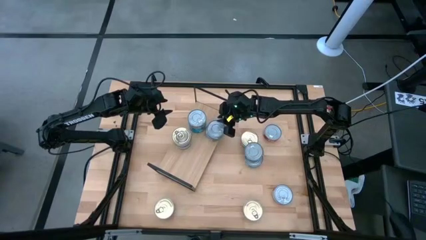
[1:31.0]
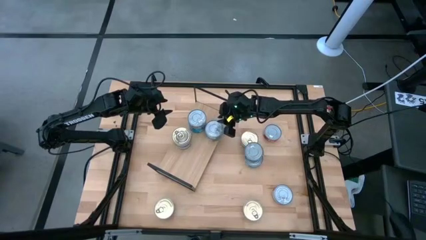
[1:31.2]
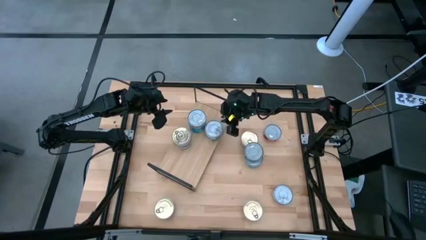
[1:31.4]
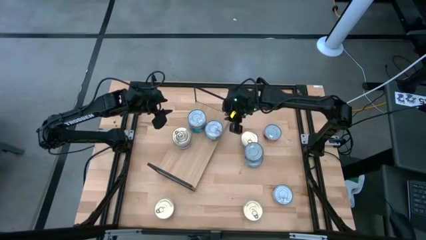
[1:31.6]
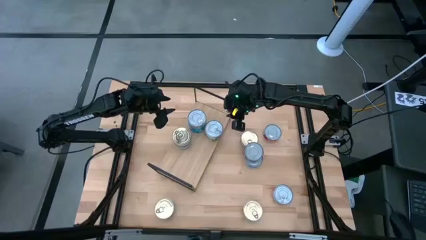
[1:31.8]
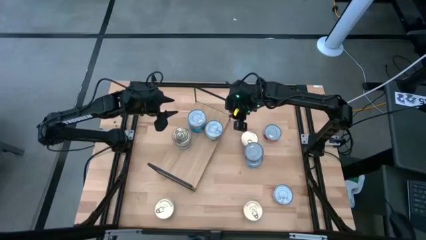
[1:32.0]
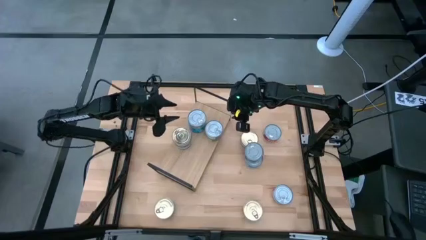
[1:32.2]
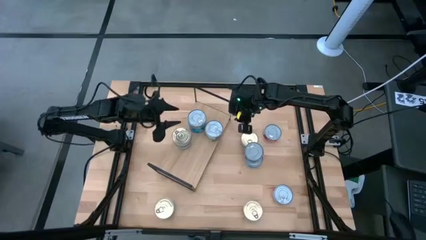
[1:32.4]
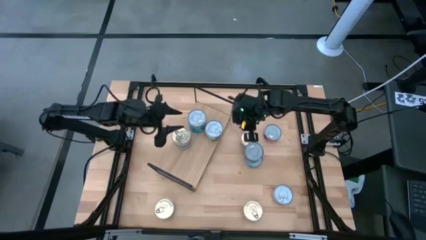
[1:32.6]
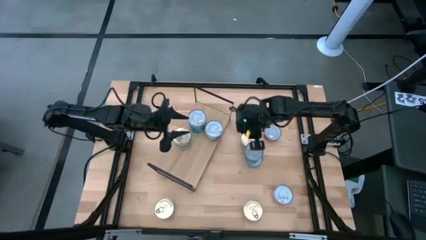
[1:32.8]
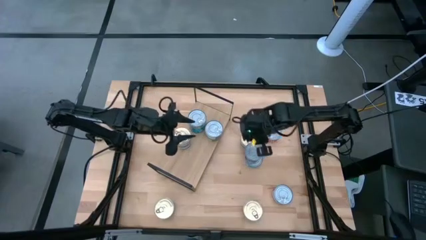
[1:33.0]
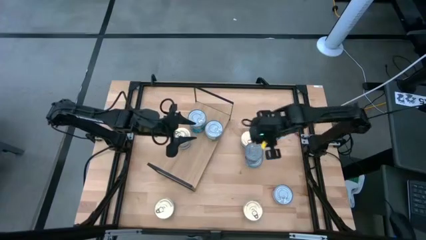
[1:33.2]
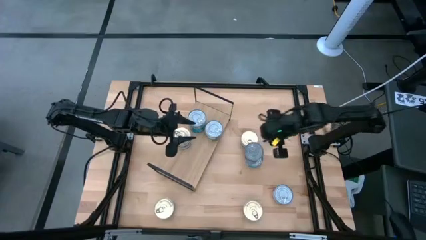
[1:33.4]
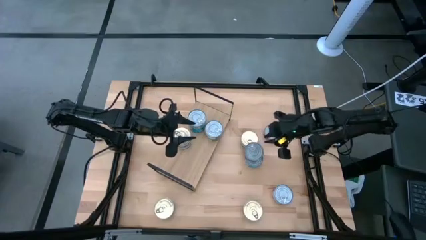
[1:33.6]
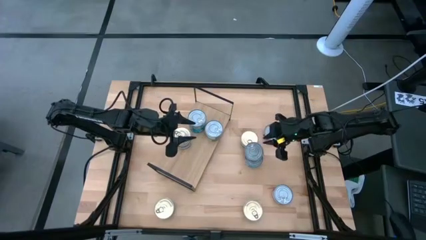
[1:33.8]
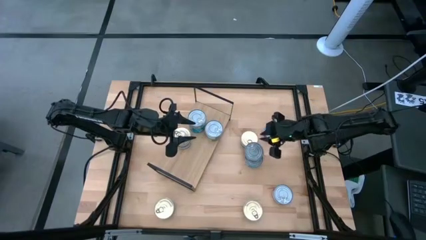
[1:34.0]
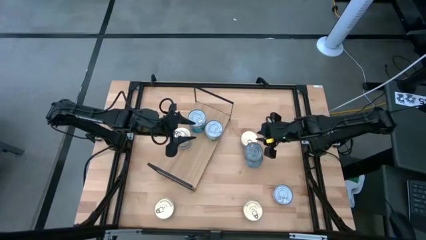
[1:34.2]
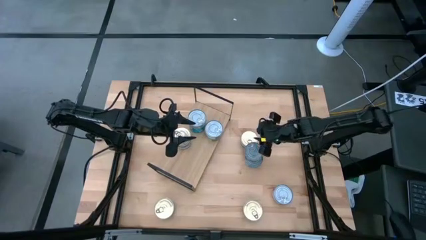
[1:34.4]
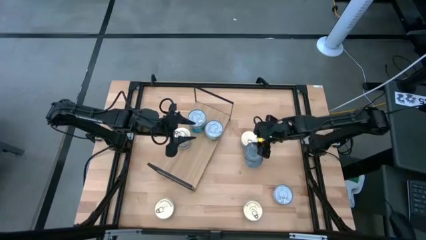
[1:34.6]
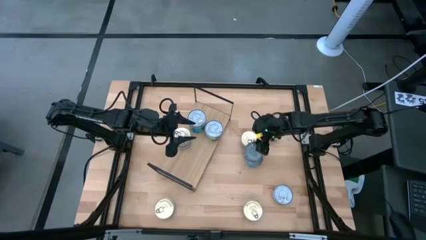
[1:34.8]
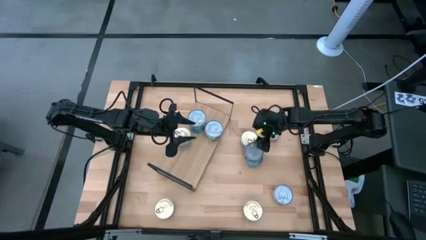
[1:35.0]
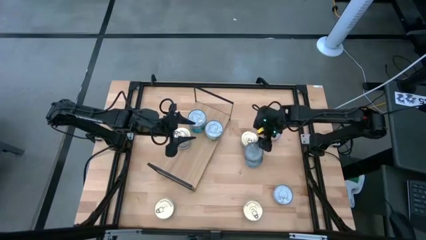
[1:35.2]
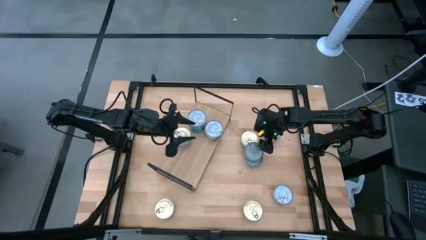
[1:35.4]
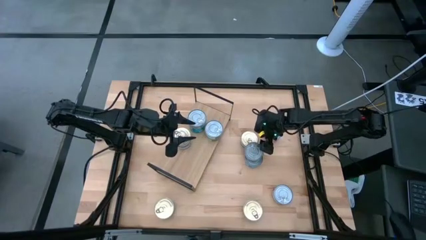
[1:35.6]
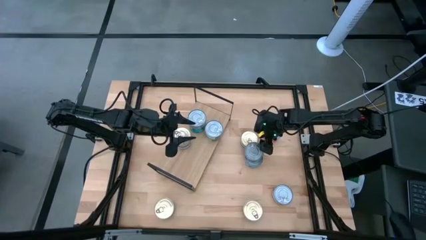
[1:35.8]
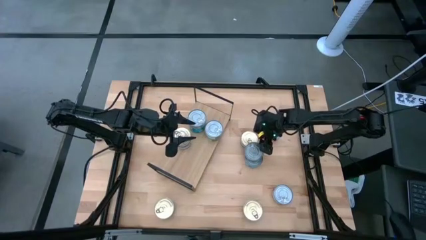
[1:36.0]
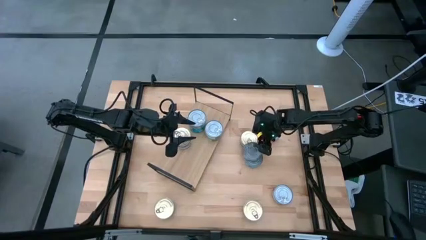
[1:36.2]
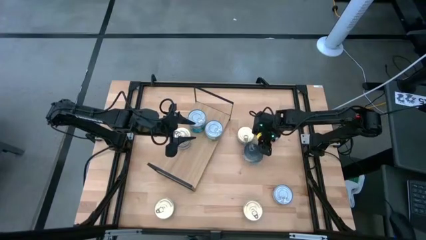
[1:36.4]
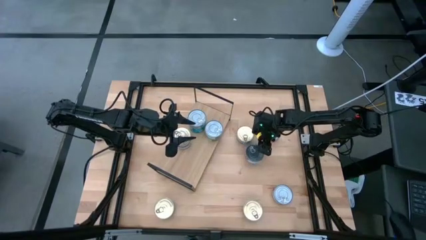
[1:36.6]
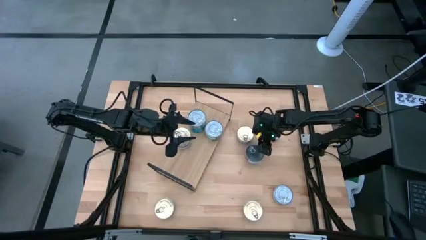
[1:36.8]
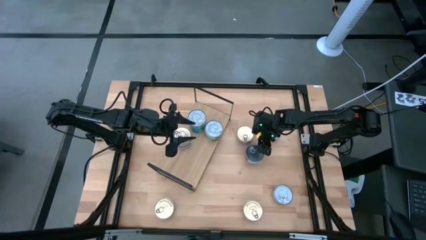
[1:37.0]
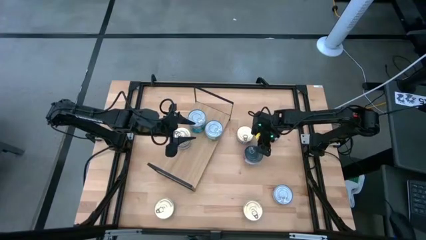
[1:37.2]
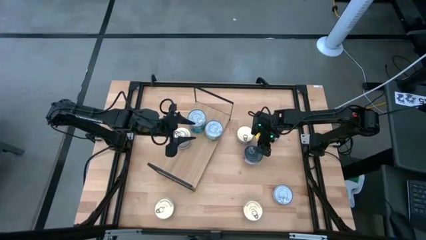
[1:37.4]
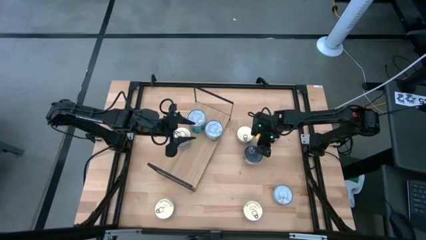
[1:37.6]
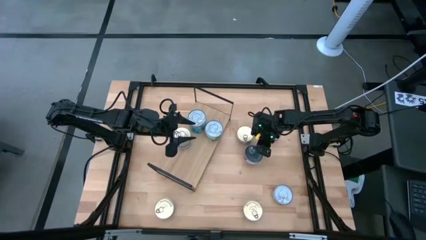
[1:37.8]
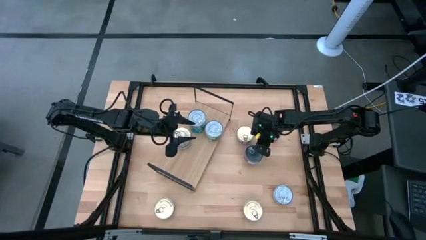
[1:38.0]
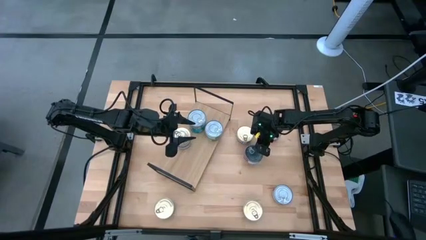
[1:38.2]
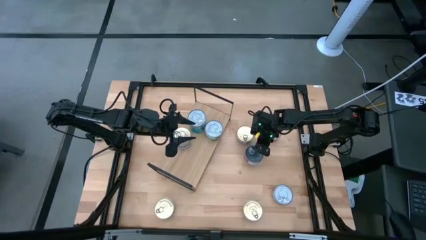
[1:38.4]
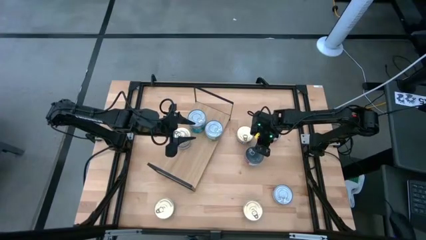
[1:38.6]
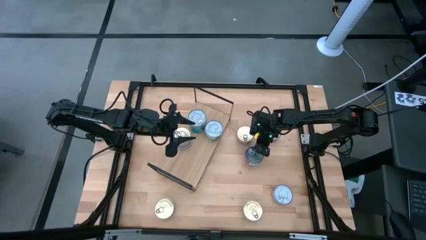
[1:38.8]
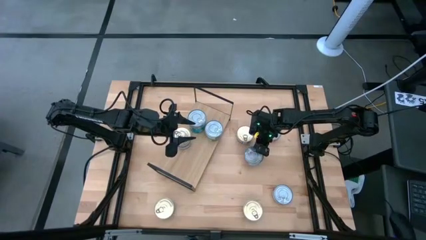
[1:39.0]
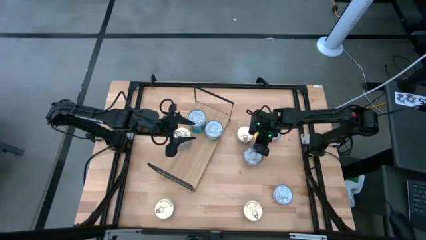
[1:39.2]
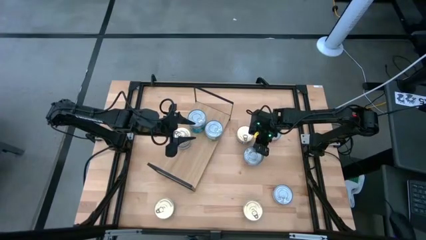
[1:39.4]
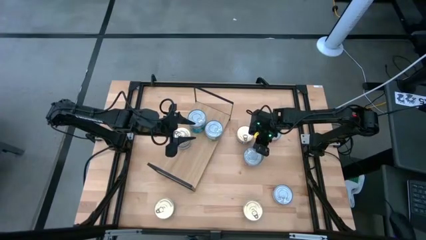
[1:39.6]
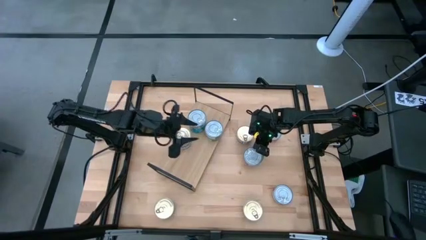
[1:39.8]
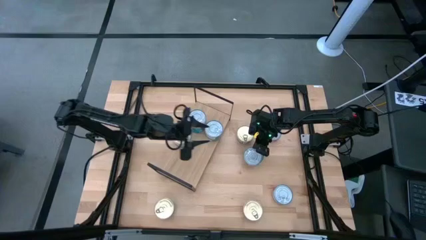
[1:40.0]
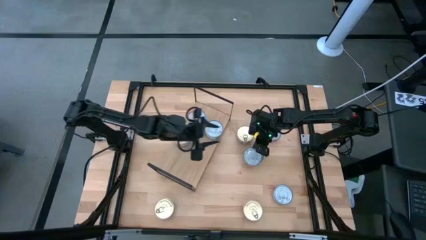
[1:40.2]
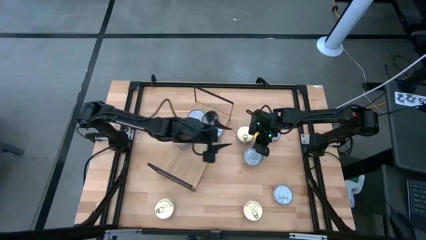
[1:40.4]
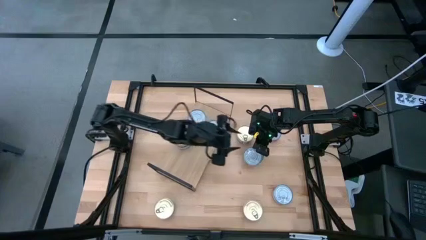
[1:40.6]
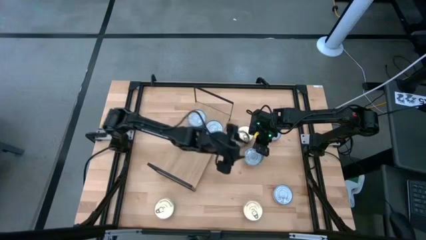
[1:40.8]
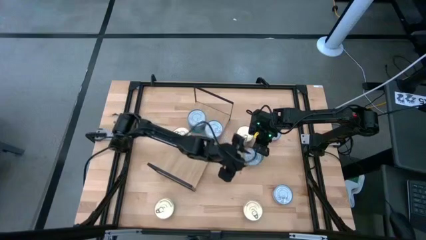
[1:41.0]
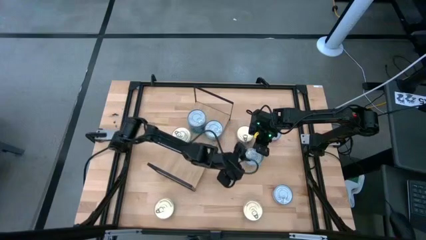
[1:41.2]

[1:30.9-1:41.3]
Task: Stack canned seafood by type on shelf
Put the middle red tuna can on the shelf

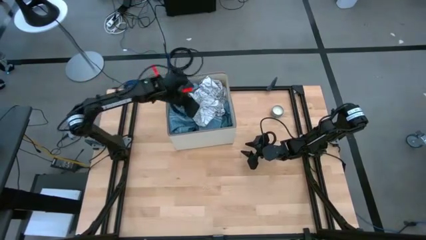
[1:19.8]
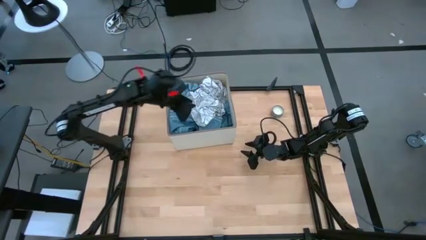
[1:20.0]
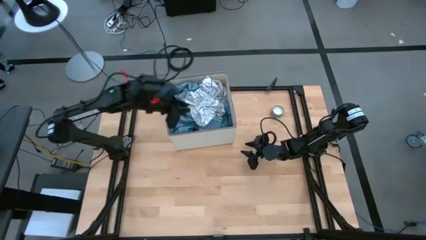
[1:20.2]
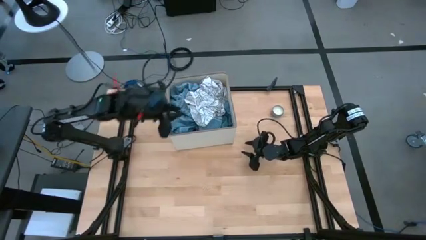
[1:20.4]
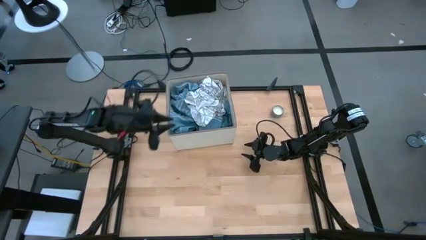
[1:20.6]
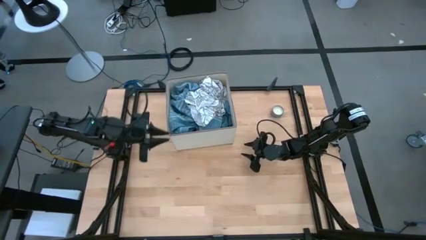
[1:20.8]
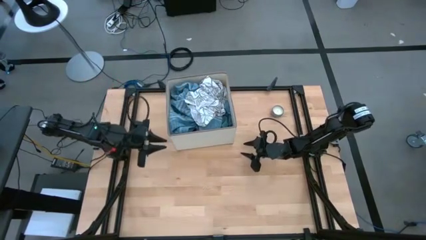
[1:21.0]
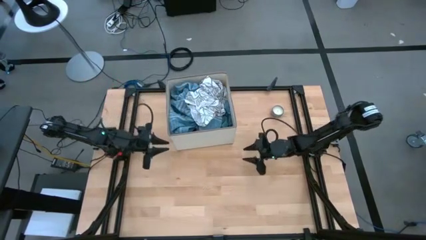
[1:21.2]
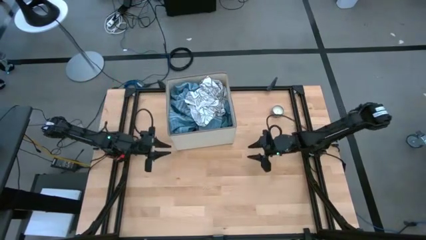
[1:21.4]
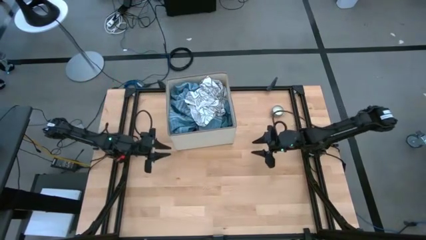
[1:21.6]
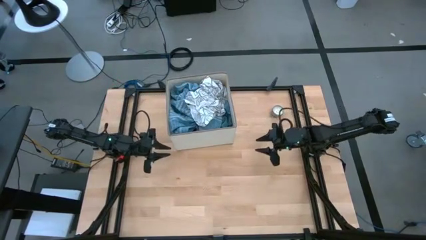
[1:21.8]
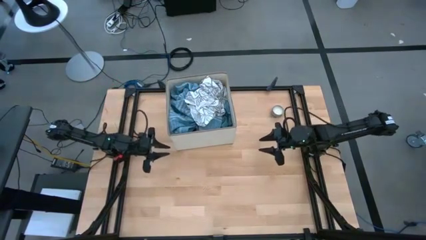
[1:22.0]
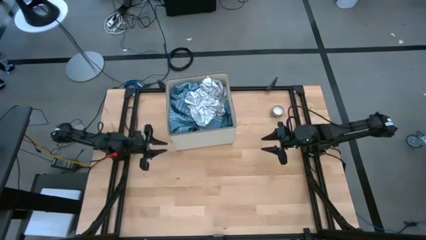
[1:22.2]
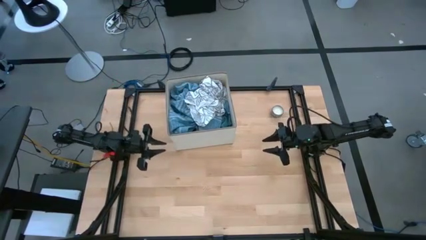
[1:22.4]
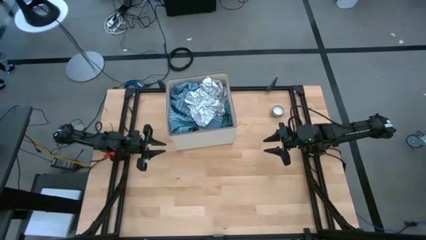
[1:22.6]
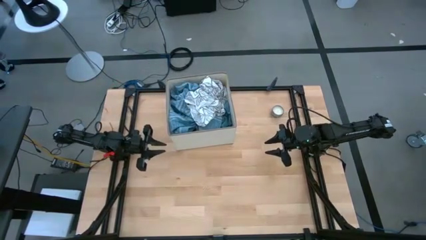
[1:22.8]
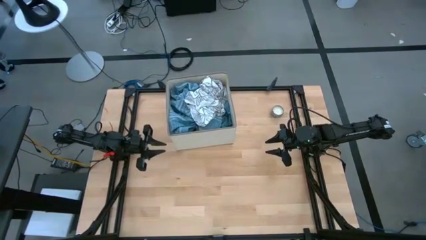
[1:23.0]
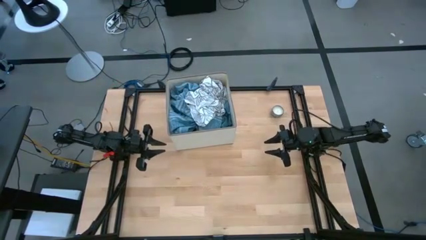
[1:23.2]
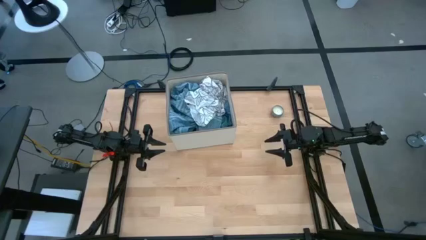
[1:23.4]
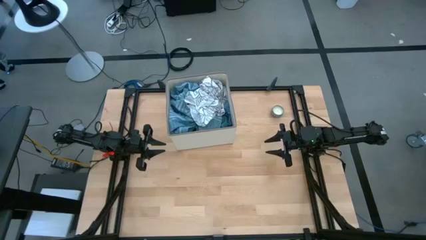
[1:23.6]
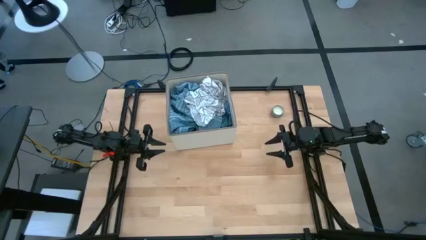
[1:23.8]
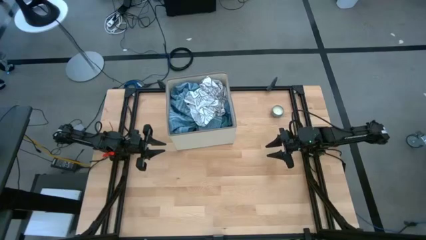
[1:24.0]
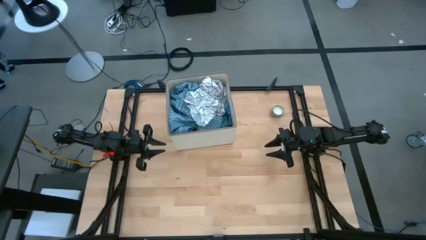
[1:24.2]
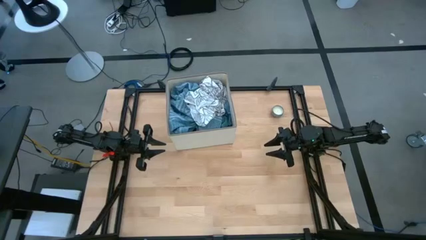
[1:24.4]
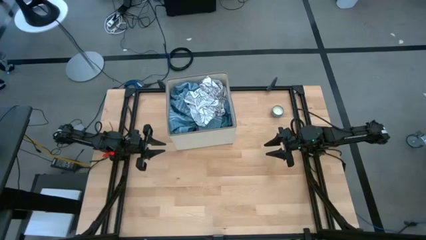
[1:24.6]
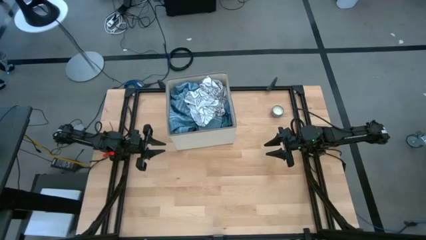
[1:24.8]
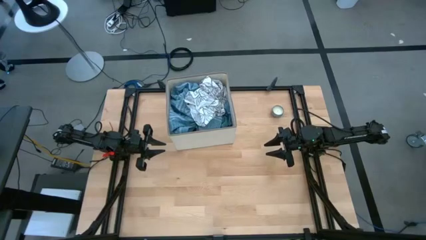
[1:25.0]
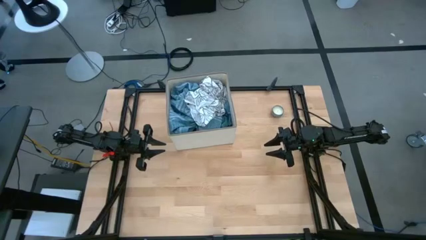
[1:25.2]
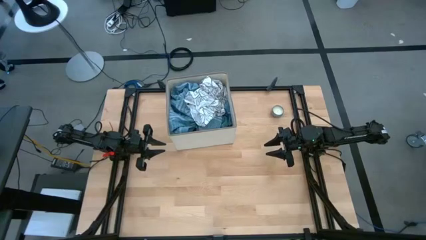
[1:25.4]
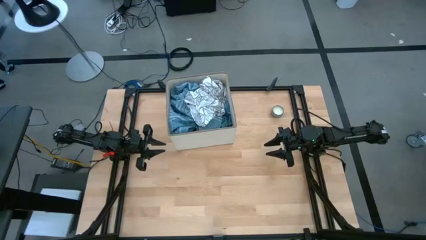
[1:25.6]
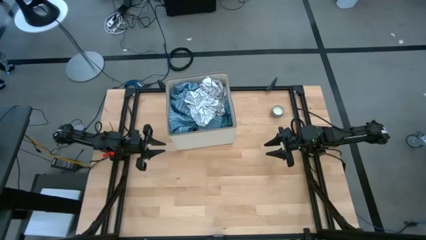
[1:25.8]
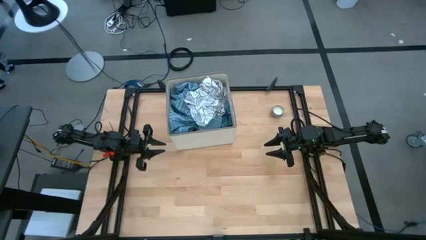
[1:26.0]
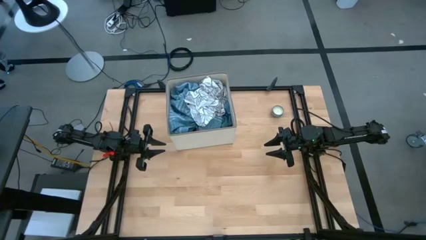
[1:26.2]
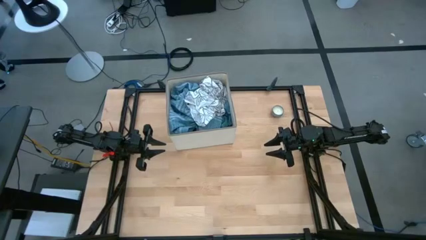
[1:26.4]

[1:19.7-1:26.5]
Task: Sort clothes
Return to Home Position

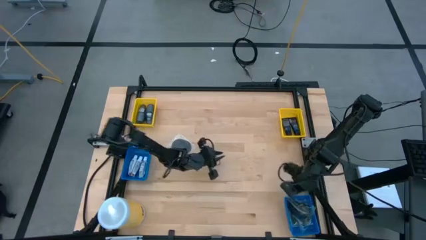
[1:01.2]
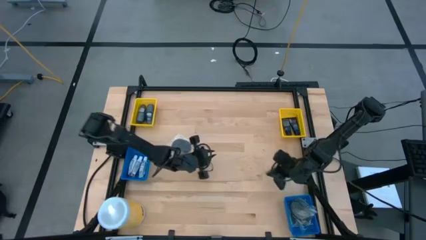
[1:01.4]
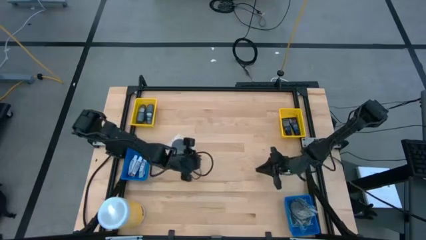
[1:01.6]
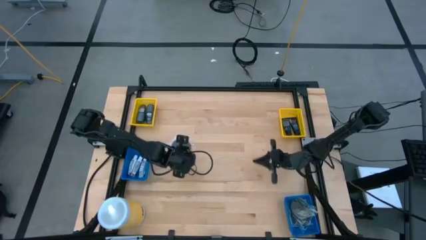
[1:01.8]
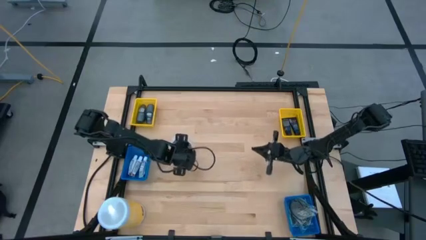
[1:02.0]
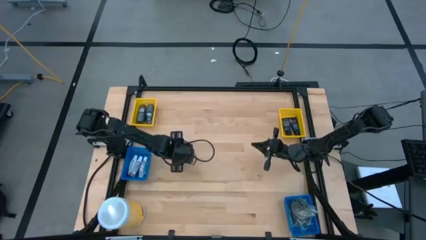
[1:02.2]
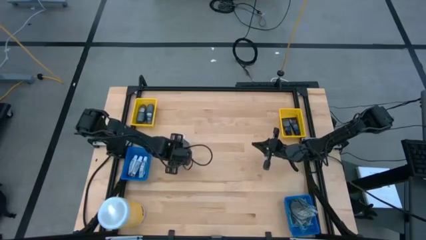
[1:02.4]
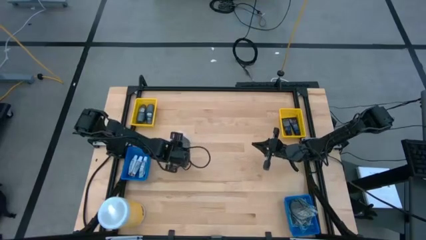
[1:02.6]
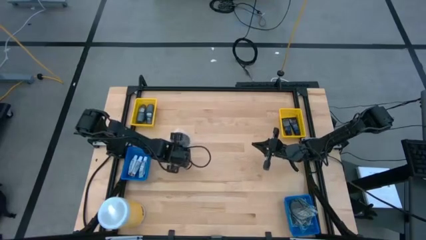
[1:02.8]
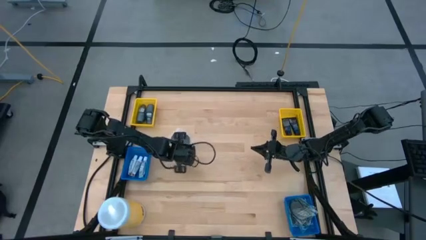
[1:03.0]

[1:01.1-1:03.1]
Task: Pick & Place Travel size toiletries
Put the black hairbrush into the right blue basket
